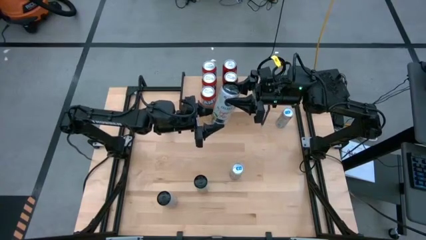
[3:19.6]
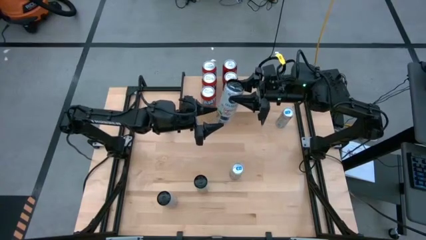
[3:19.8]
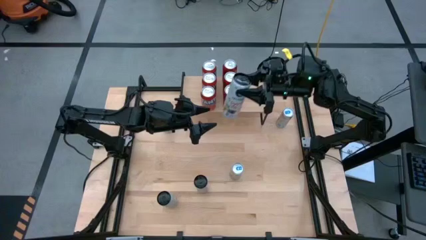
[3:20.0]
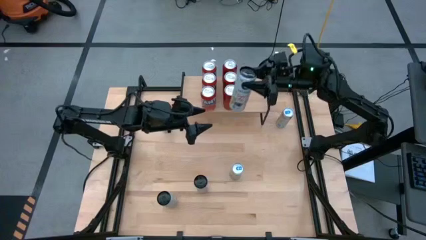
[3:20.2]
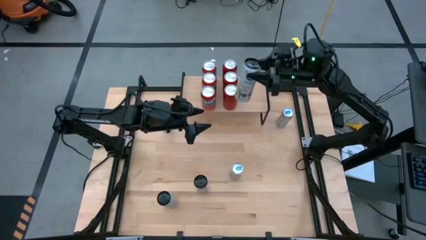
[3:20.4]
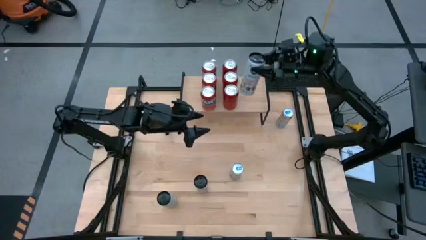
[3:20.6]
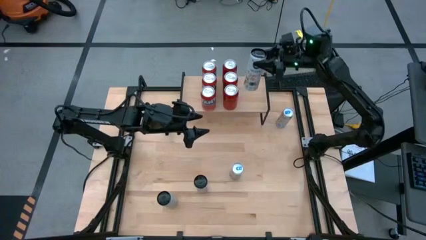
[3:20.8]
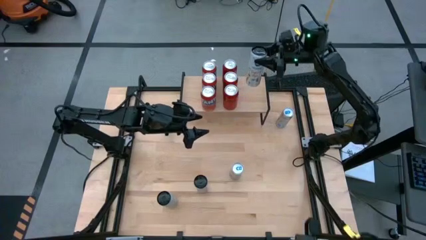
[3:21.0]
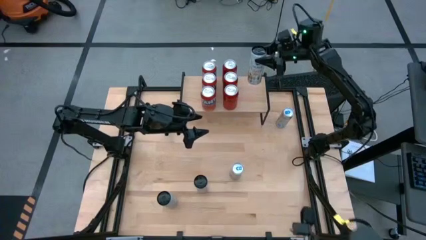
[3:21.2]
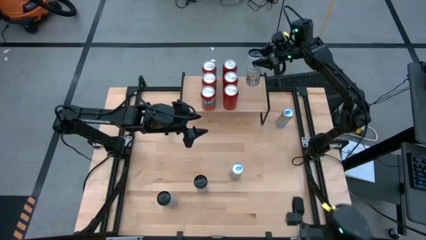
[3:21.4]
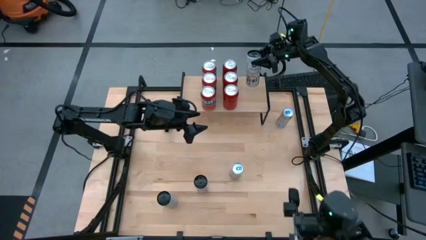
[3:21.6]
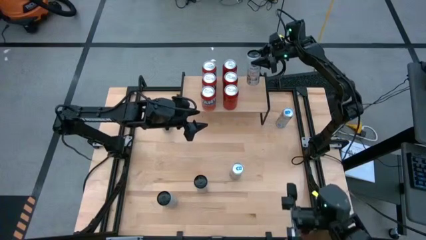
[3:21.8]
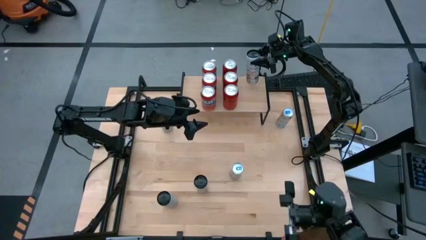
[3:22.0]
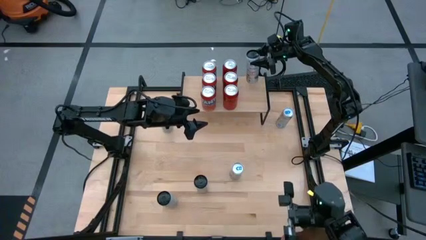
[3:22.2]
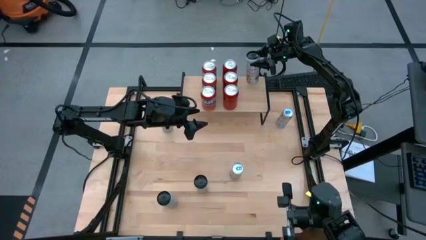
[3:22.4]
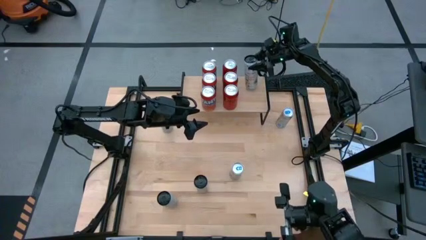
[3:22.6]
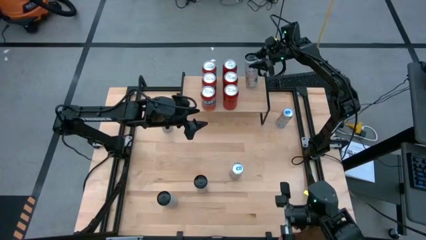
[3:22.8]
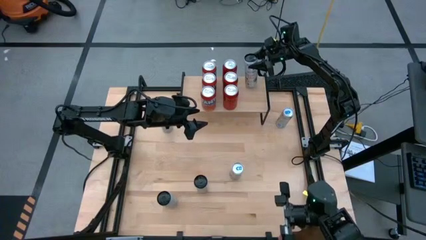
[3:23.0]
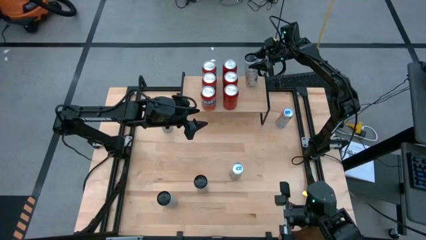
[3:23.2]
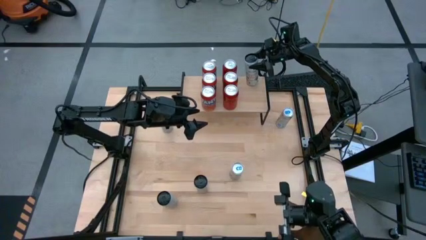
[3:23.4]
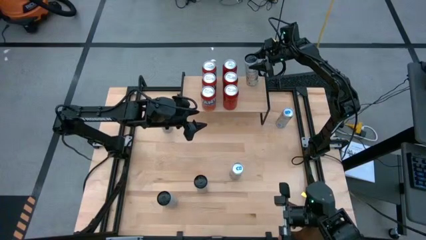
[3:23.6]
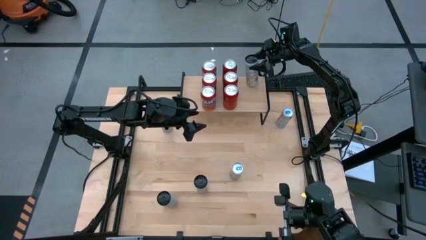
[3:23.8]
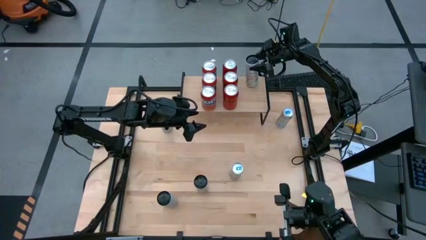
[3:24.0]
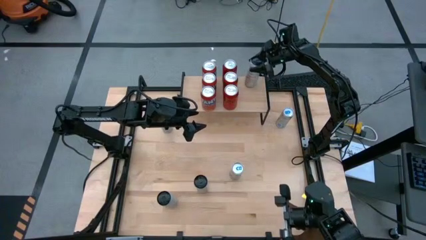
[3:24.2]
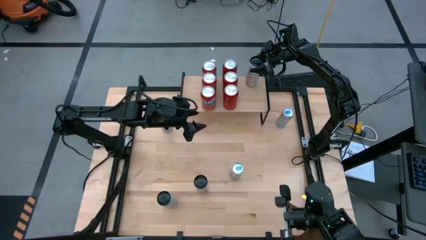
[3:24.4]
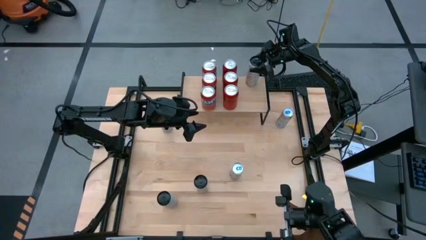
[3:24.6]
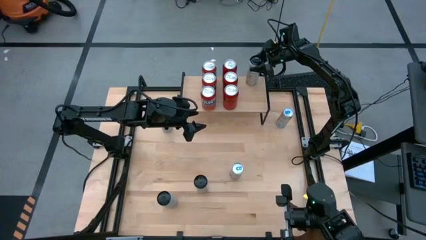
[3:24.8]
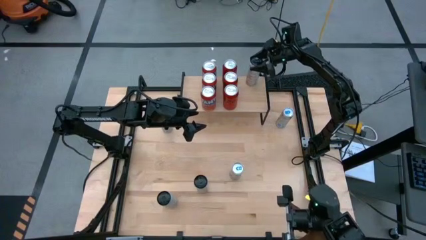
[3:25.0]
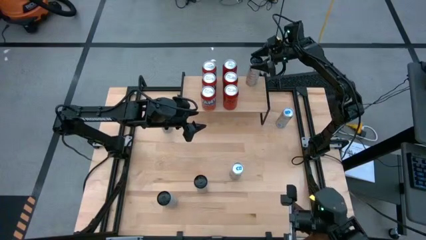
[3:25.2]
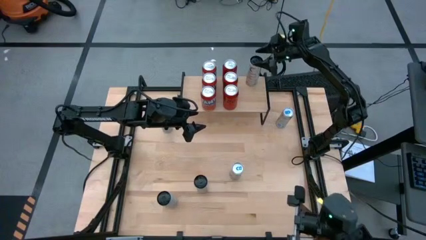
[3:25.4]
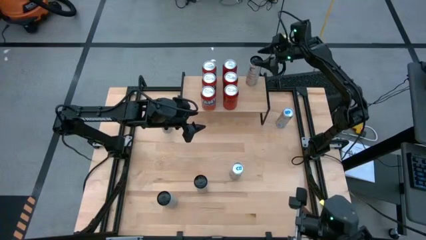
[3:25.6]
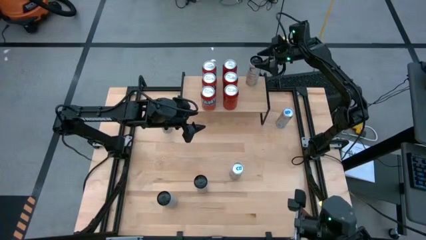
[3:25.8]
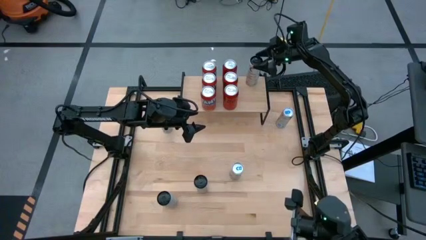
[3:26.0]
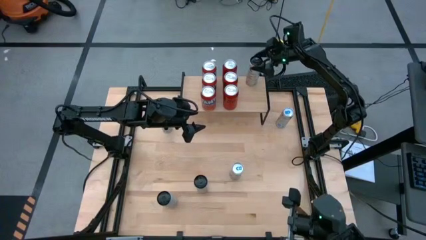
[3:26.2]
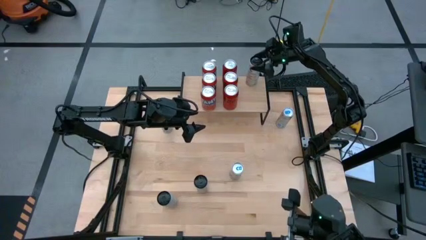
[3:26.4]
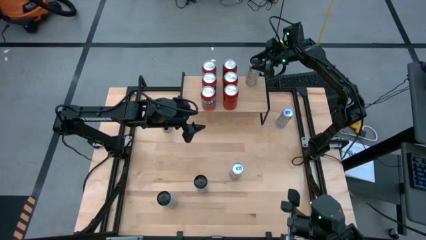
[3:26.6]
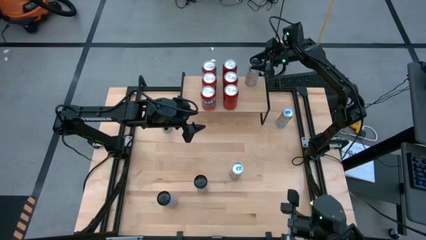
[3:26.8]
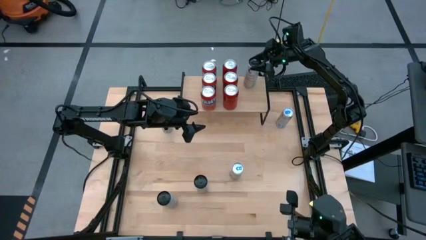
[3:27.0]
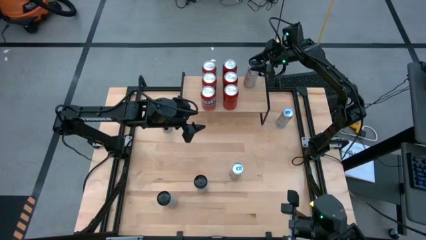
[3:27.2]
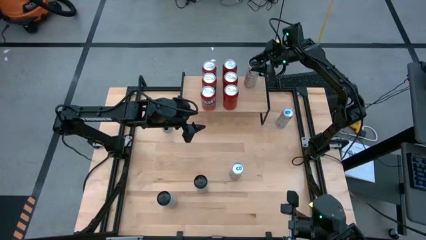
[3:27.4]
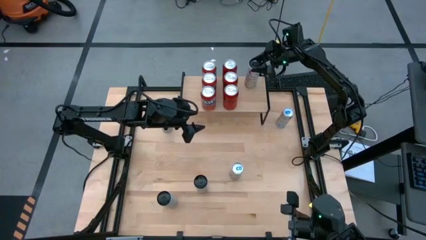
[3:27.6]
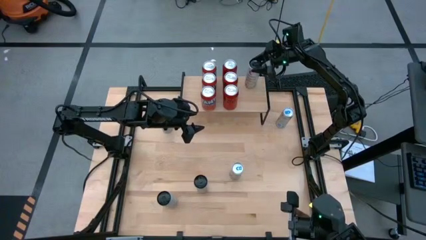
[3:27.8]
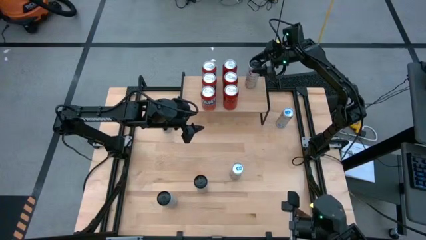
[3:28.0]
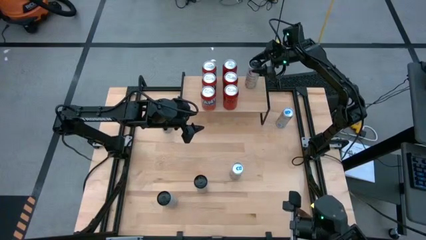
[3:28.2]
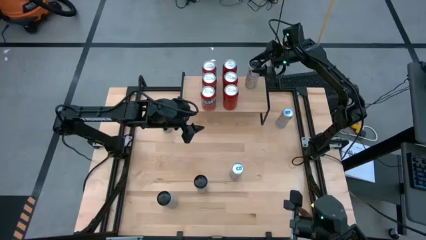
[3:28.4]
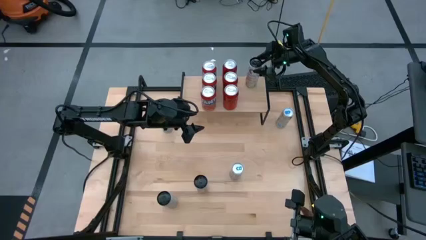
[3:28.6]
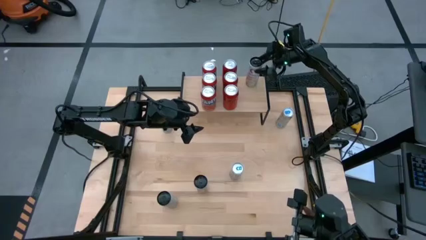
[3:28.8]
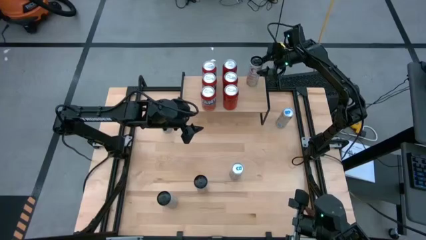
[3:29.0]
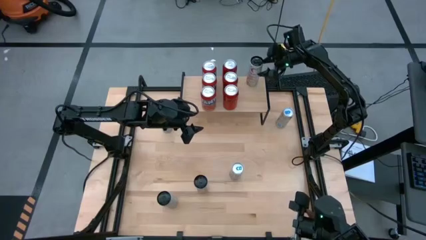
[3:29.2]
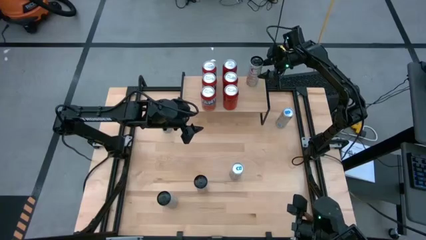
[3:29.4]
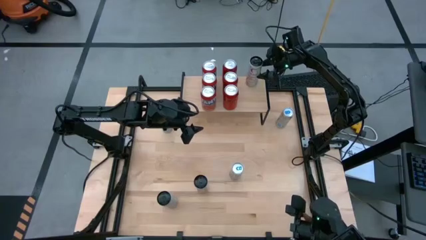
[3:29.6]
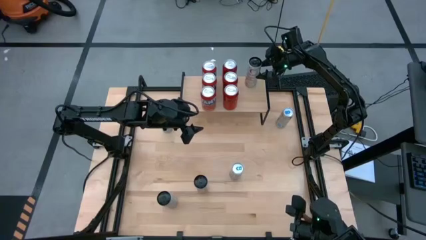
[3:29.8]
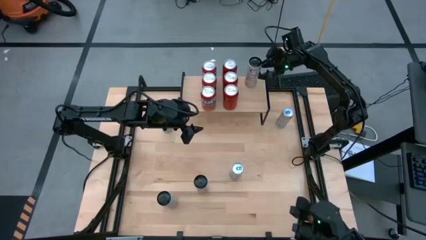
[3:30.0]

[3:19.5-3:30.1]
Task: Place canned beverage on shelf
Put the top white-yellow soda can on the shelf

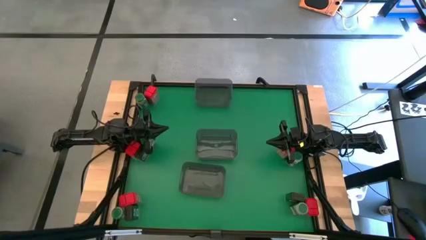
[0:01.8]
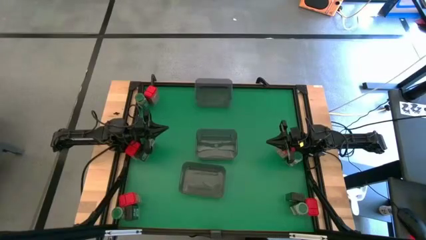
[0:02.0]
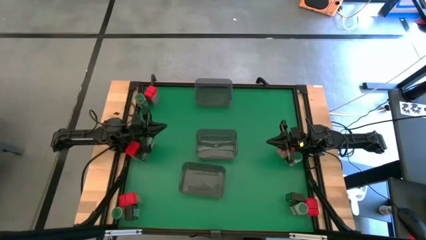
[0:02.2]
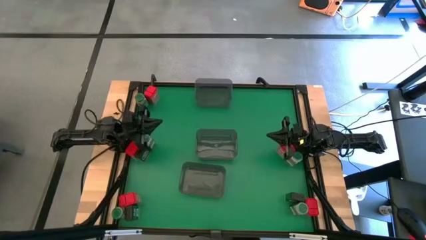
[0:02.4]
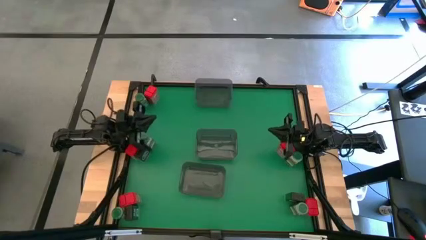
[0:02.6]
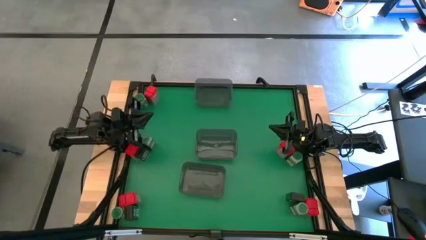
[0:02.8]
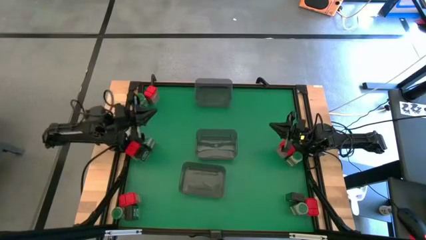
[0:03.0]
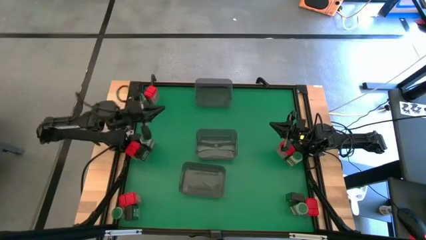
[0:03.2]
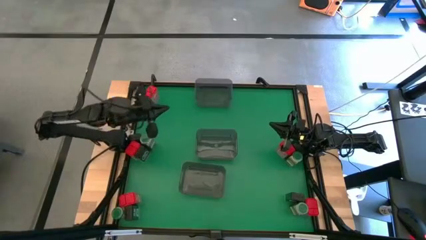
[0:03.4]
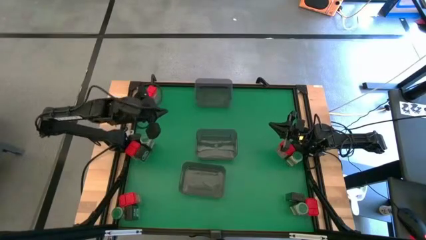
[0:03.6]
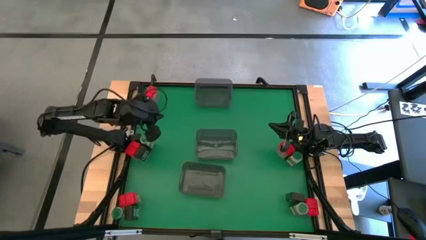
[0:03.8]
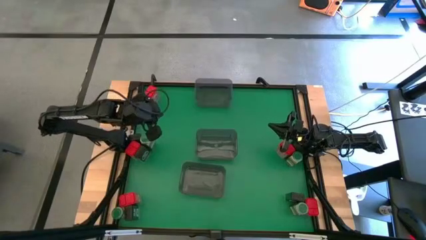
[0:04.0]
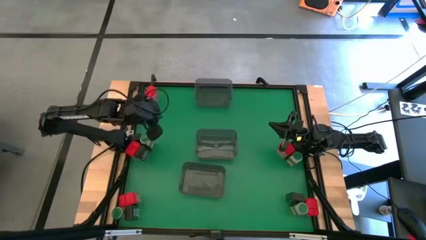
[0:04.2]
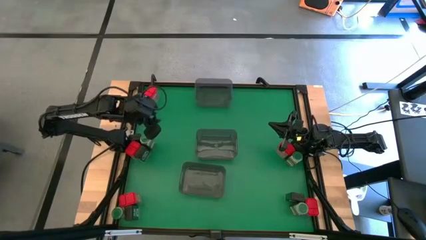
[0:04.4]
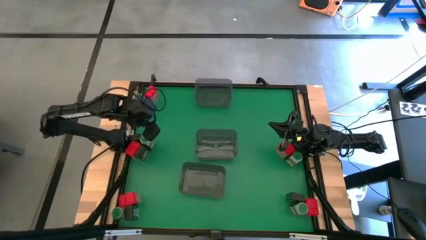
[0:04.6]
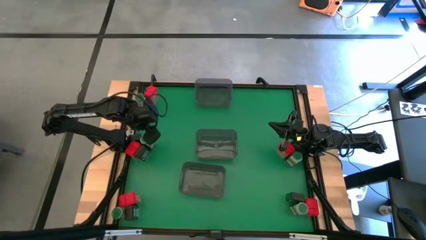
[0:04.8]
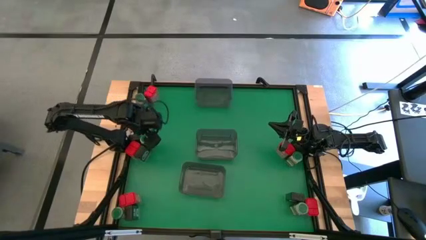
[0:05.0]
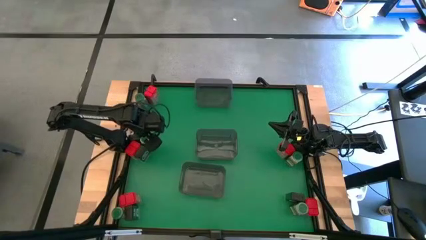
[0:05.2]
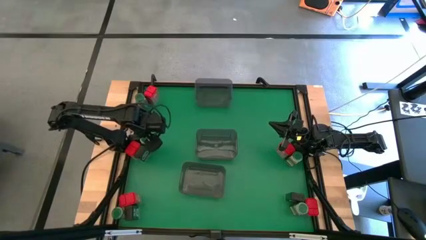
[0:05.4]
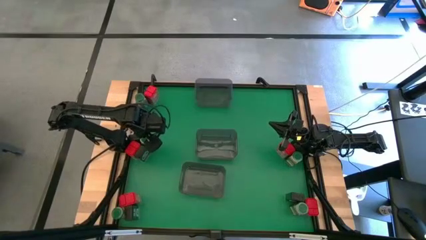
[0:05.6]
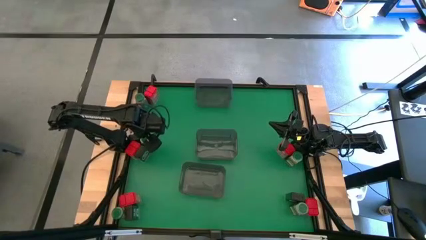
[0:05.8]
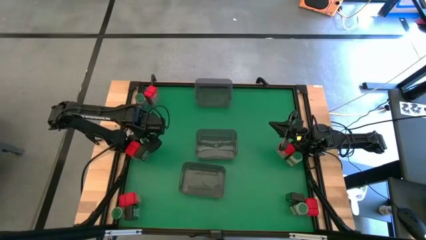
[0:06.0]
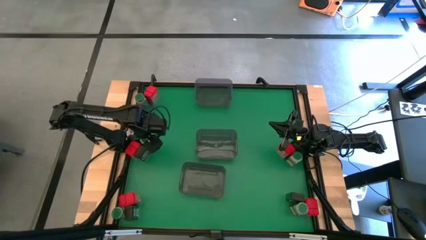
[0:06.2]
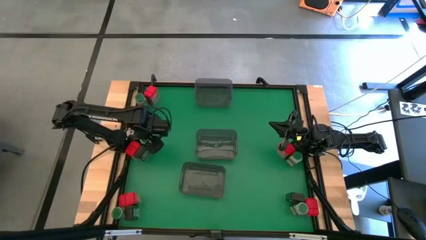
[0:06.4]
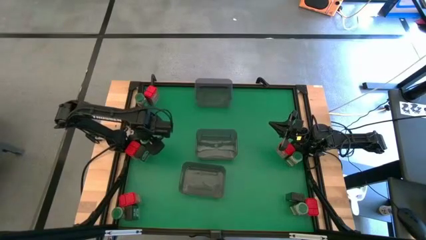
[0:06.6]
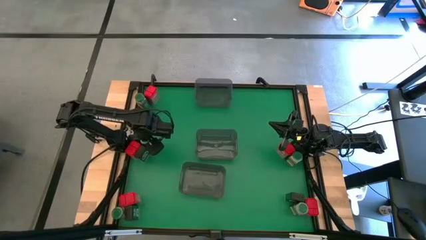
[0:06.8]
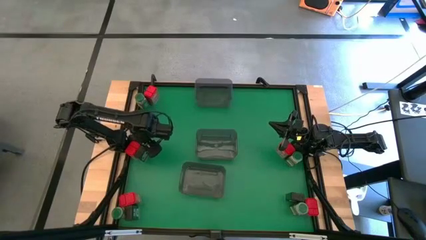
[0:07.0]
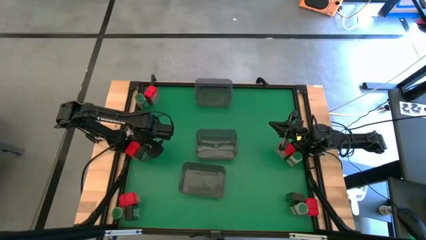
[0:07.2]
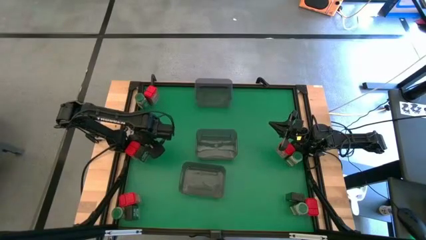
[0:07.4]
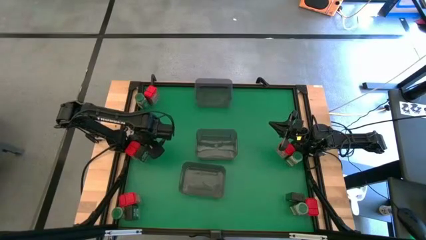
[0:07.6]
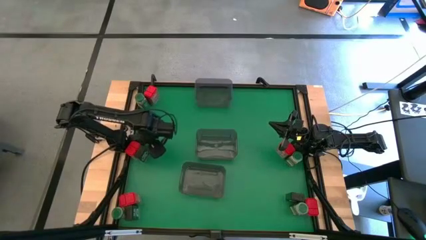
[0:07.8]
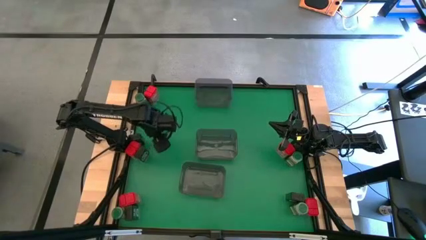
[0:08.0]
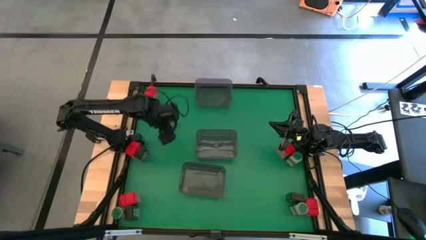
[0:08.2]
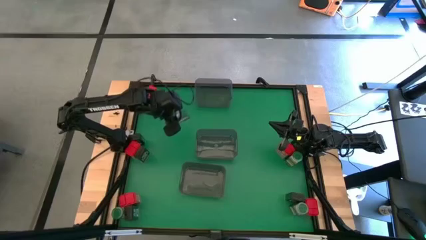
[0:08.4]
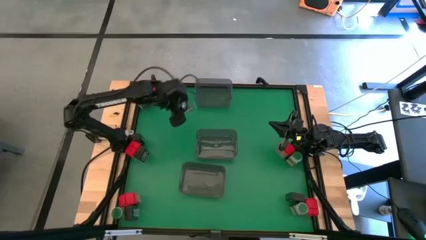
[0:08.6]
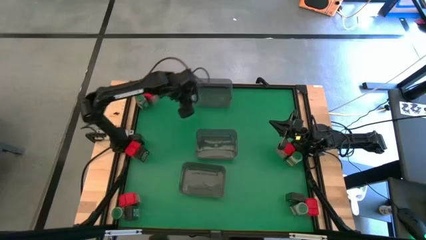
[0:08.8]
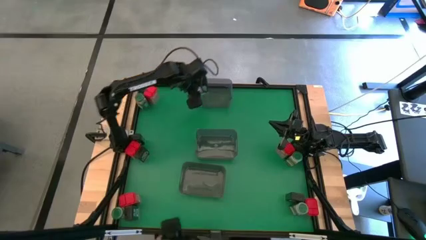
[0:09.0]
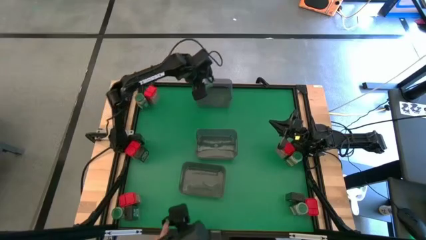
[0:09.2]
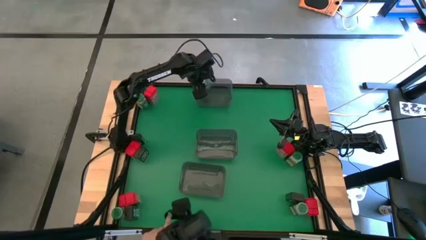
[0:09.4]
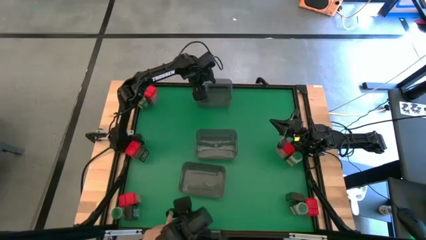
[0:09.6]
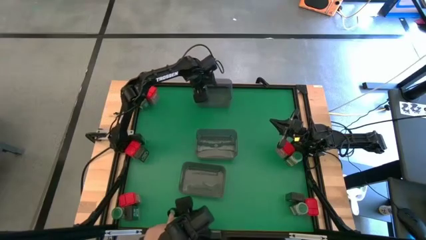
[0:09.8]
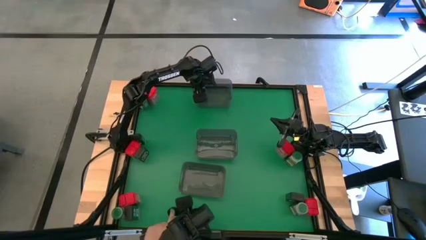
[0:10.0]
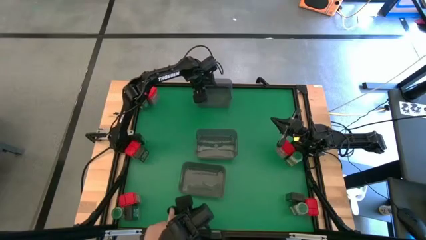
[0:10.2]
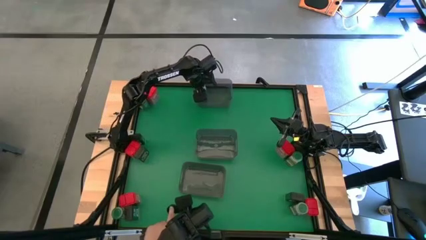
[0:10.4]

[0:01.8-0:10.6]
Task: Sort spices by type
Put the green seasoning bottle into the top gray bin
